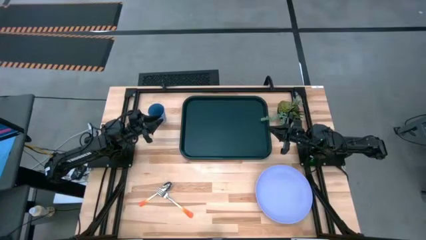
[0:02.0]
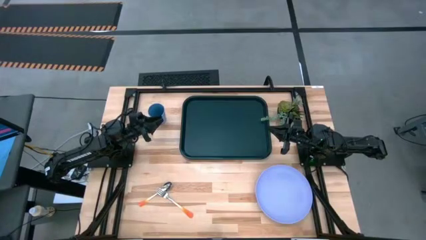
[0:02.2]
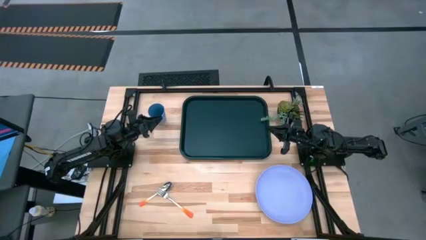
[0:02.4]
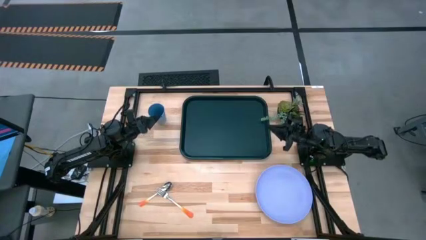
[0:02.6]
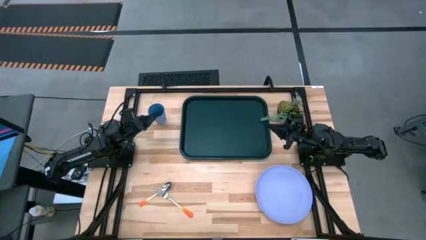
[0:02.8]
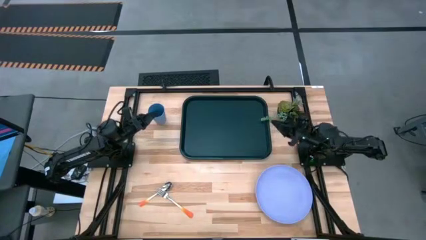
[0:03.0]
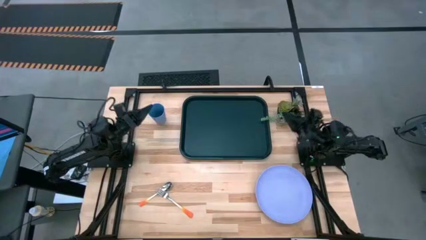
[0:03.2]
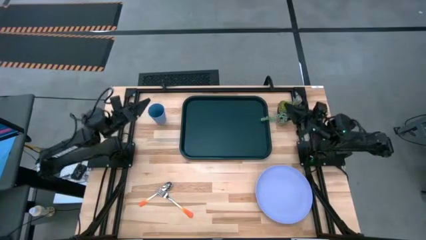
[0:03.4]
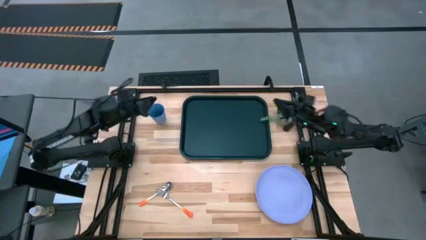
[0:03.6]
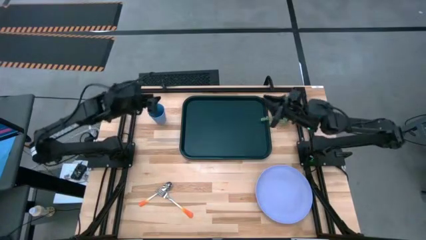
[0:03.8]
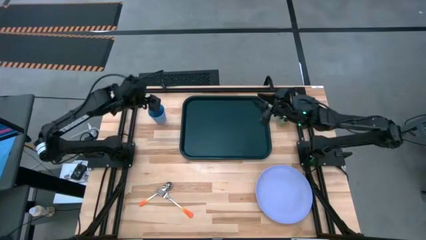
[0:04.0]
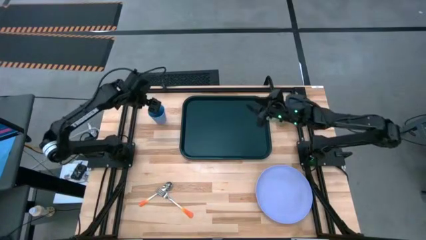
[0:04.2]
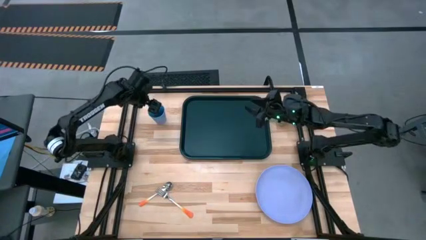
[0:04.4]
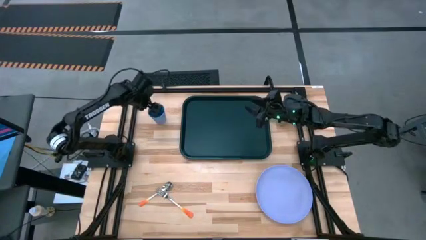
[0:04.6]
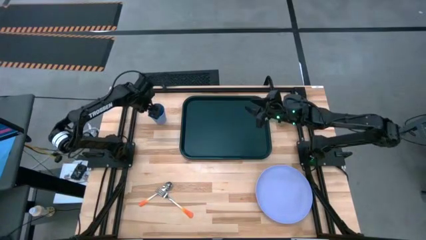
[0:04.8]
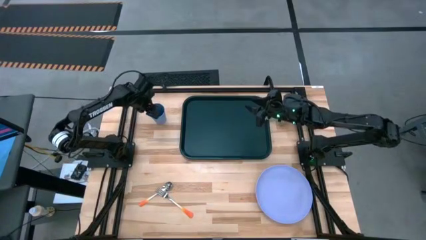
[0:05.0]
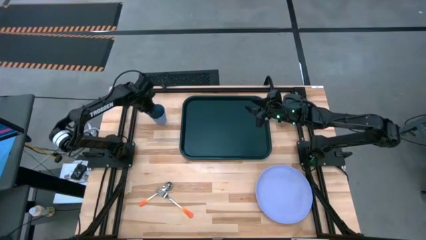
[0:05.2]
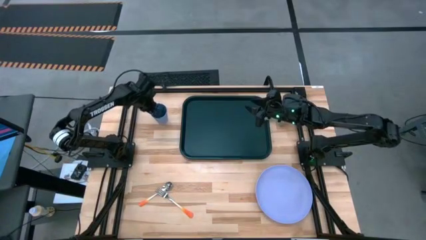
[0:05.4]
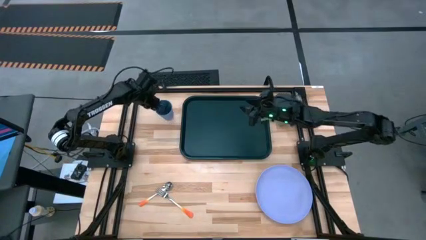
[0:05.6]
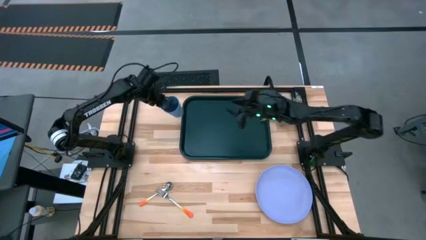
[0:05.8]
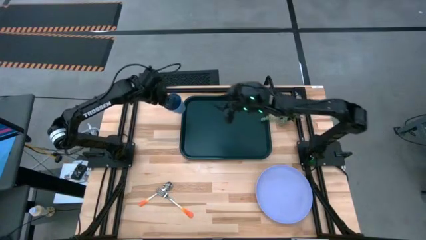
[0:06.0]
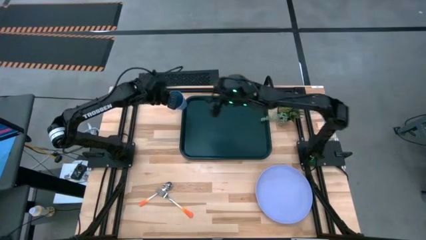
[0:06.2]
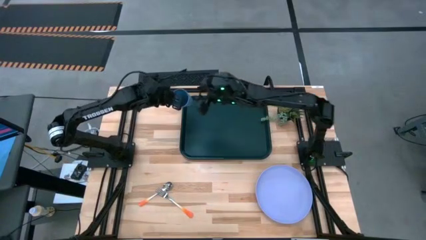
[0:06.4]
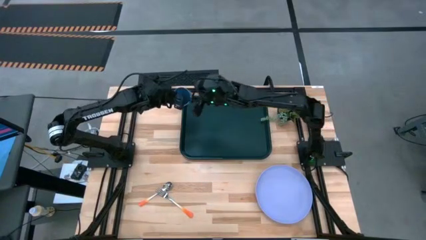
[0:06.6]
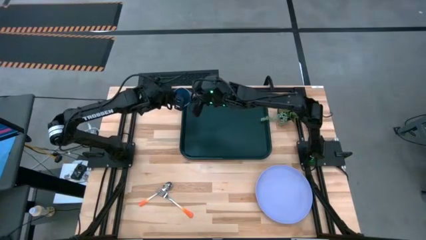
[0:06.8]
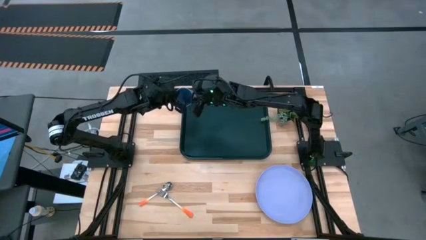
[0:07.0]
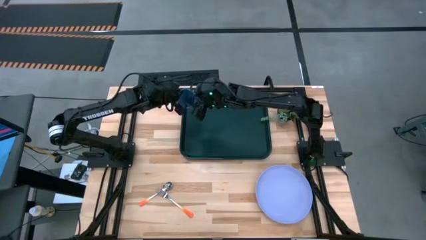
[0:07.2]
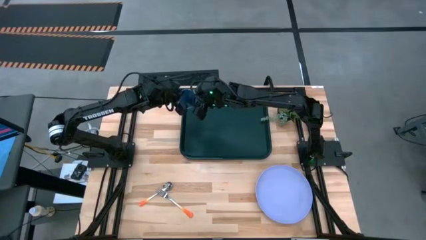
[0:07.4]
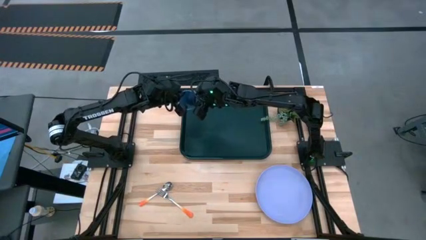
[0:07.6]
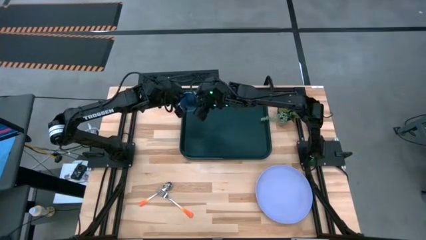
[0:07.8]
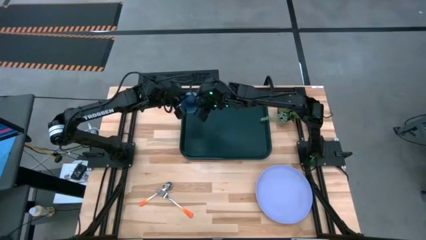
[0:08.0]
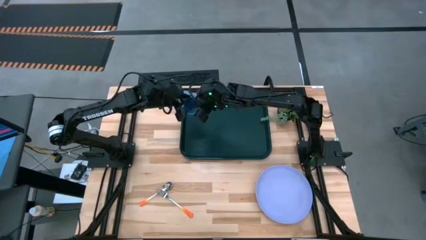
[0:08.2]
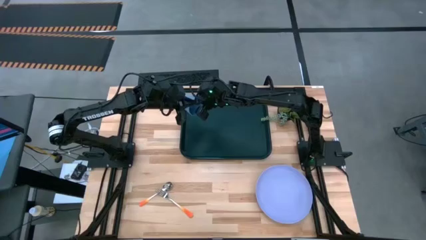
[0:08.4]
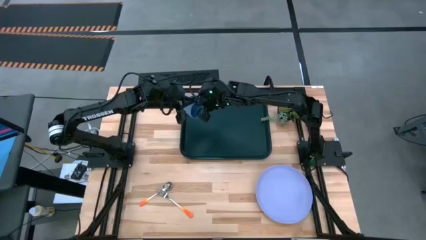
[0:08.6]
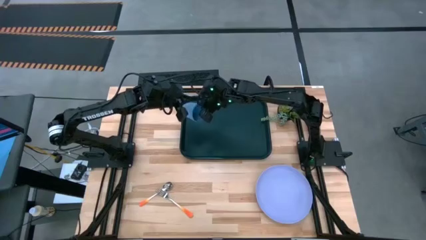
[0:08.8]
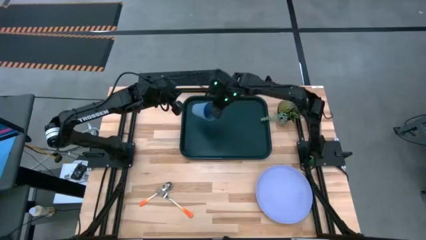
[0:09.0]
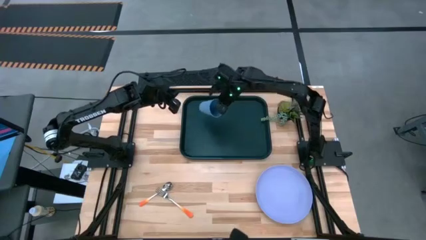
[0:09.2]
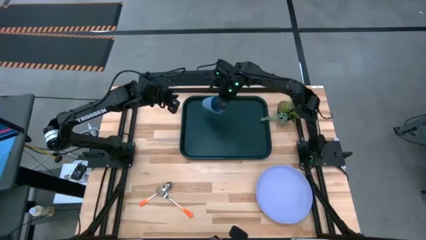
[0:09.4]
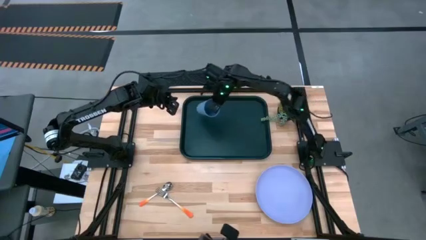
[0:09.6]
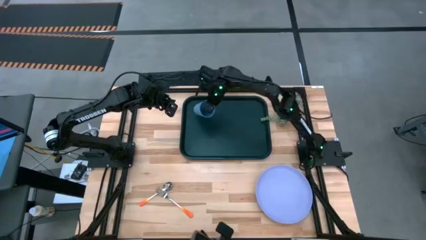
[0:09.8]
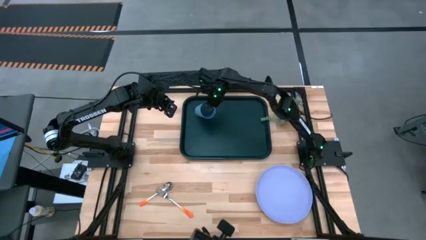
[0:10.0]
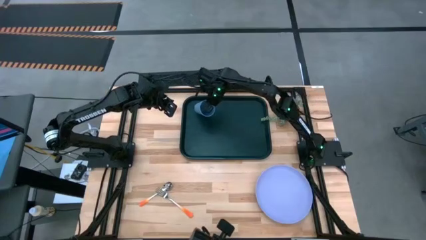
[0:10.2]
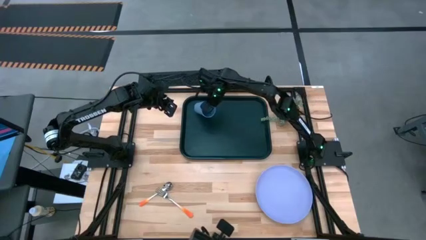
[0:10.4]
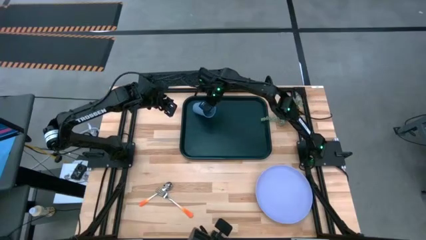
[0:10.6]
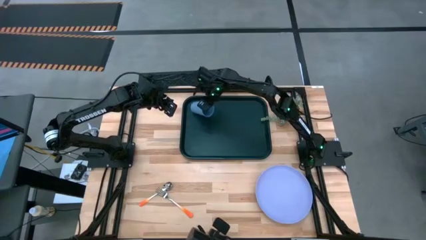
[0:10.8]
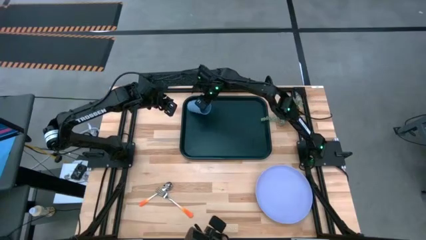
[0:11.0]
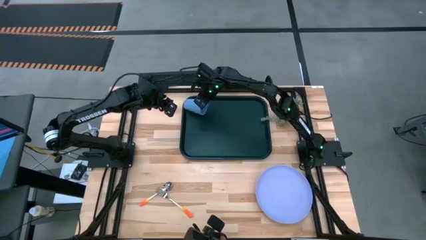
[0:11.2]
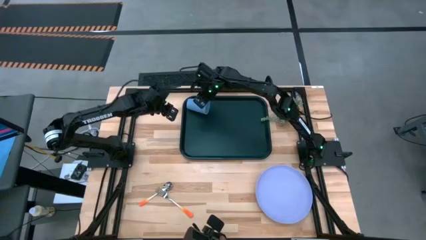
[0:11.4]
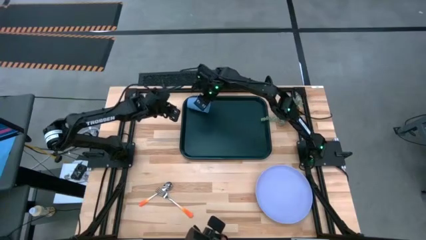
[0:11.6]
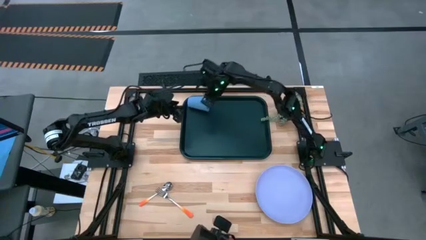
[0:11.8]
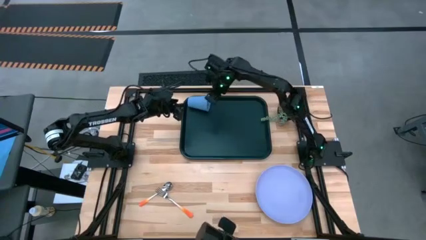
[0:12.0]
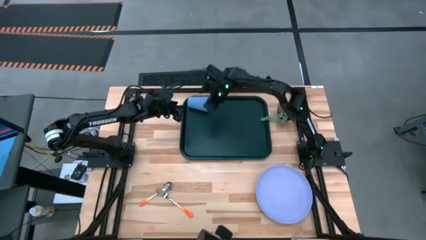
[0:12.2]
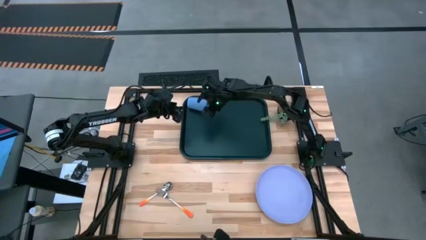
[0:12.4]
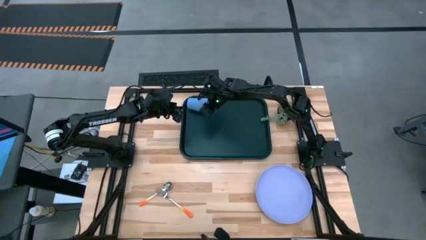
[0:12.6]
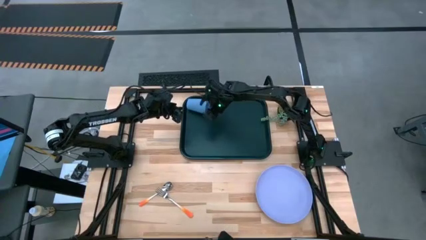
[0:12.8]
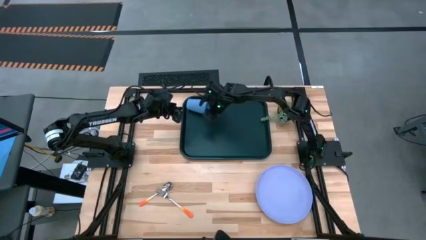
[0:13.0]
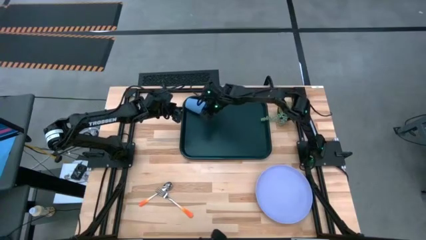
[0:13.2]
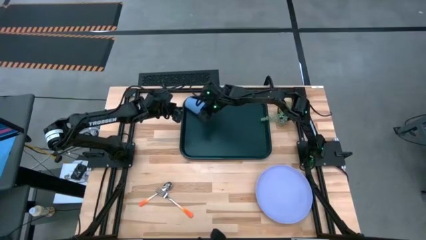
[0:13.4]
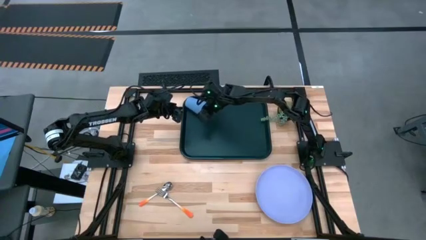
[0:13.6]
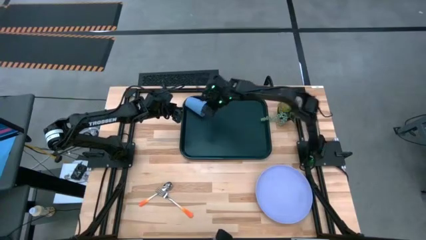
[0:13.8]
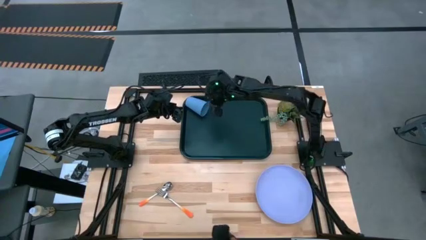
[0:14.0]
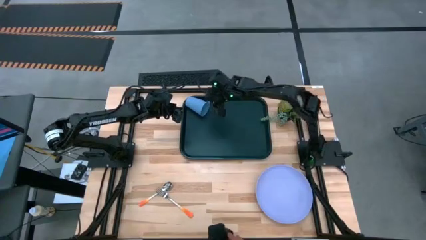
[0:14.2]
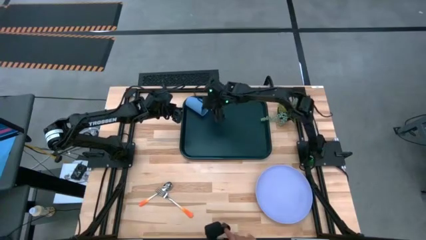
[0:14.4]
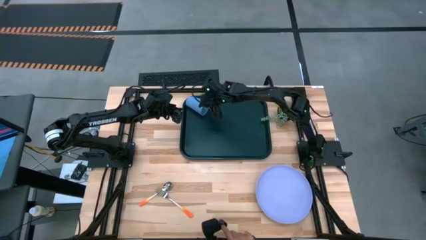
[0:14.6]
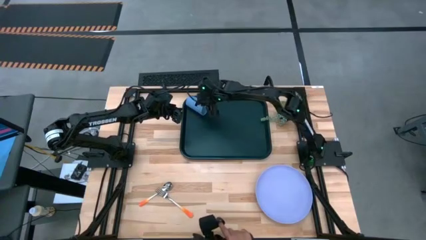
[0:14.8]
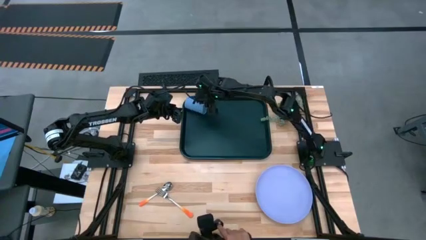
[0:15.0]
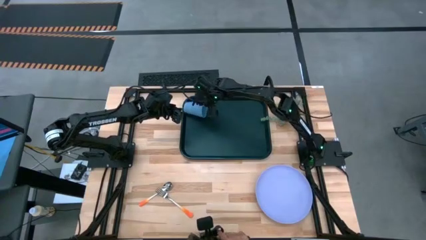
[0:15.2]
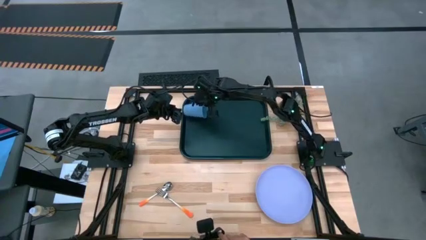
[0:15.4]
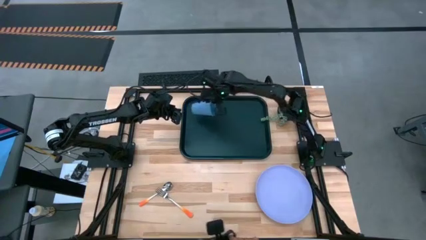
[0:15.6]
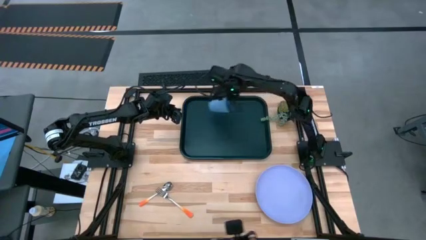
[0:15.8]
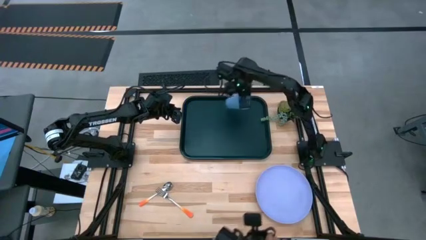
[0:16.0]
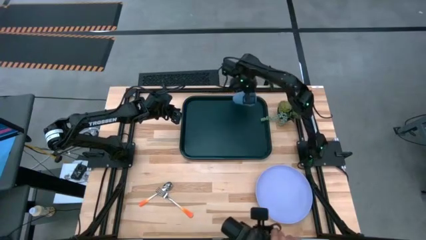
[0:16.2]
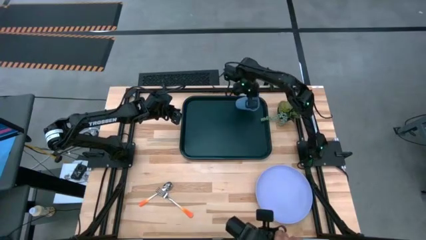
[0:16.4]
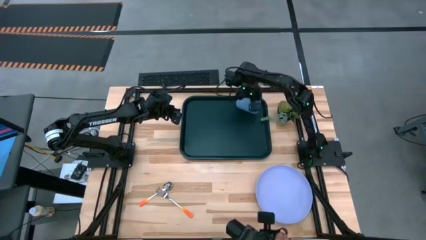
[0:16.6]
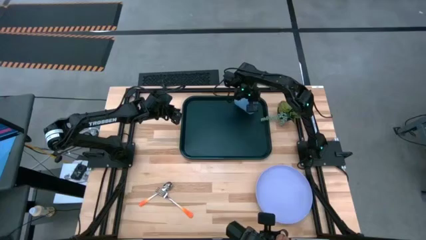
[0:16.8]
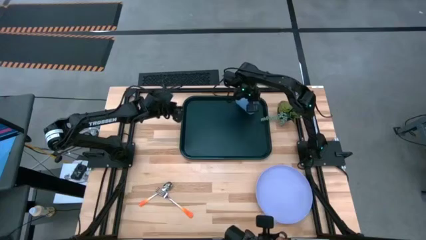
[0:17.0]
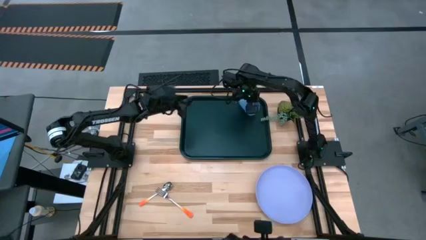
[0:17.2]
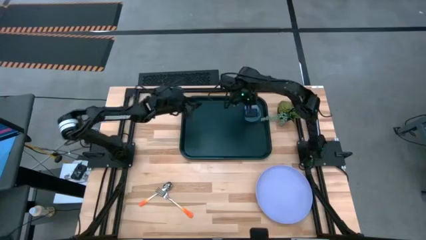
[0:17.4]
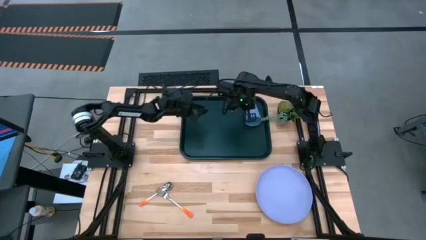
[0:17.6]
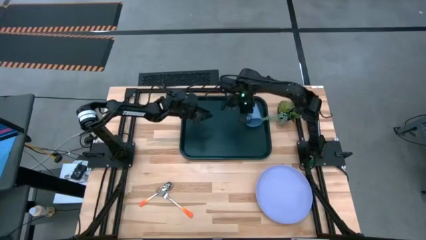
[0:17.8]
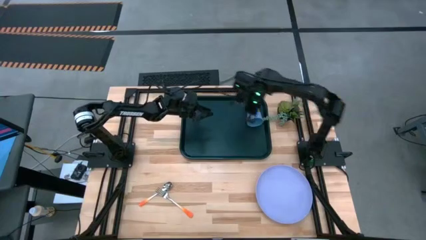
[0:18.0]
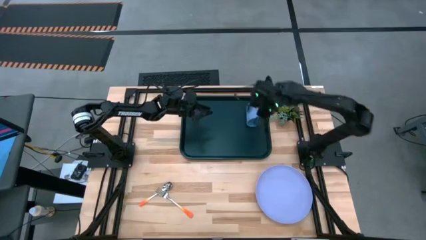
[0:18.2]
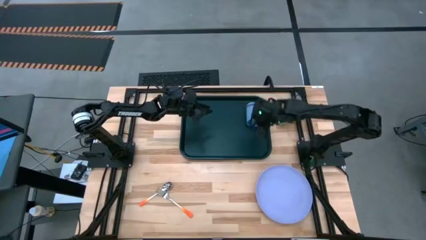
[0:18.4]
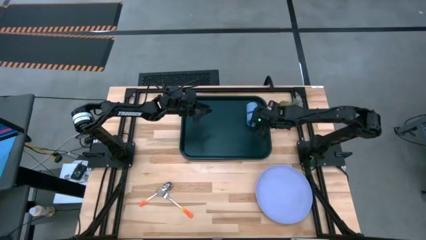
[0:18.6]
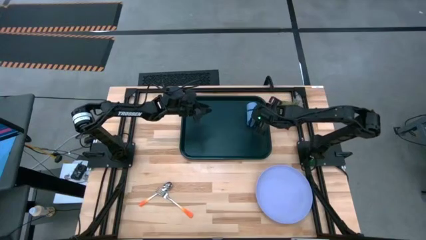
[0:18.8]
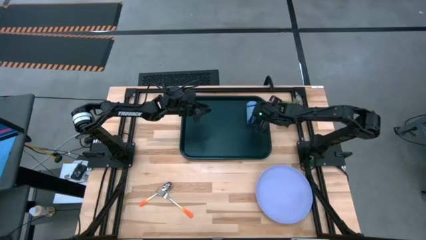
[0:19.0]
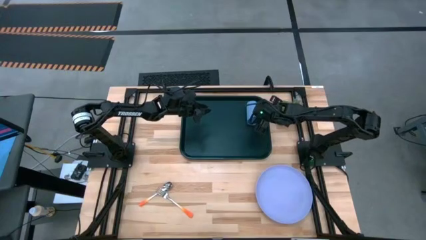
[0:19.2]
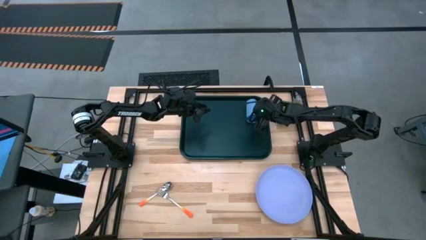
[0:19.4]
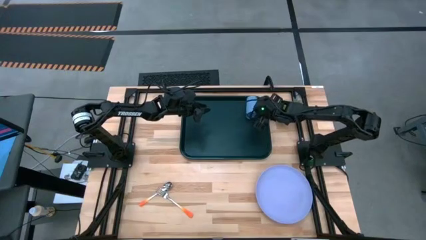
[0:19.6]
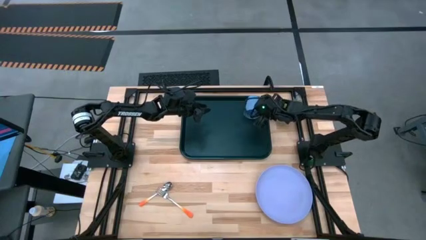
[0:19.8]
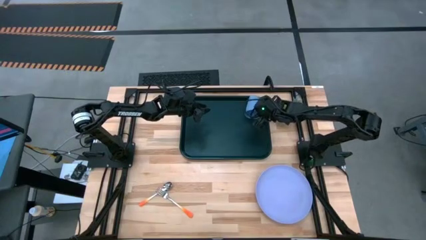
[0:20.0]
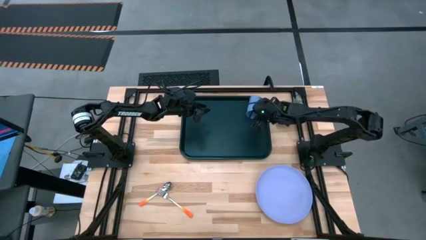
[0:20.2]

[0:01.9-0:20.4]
Task: Pick and place plate/cup/fork/spoon on tray
Put the blue cup on the black tray
